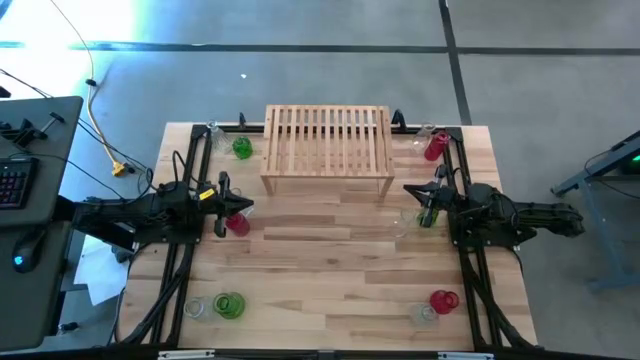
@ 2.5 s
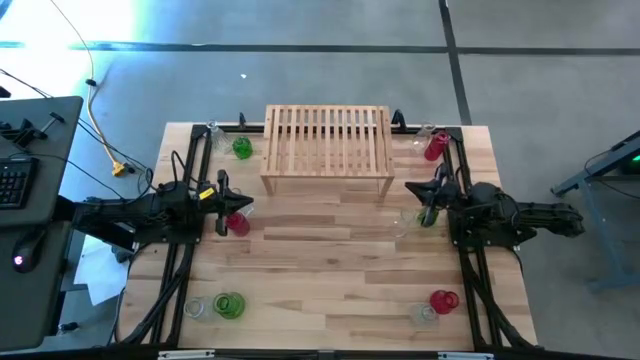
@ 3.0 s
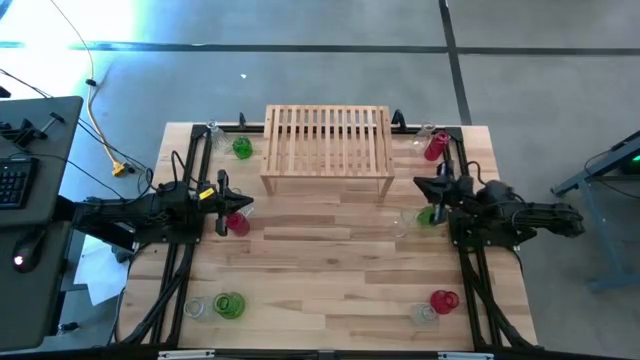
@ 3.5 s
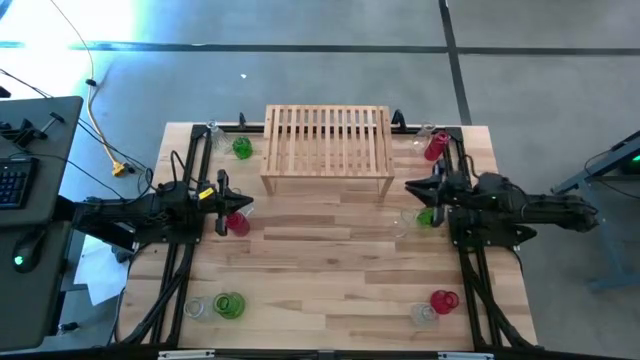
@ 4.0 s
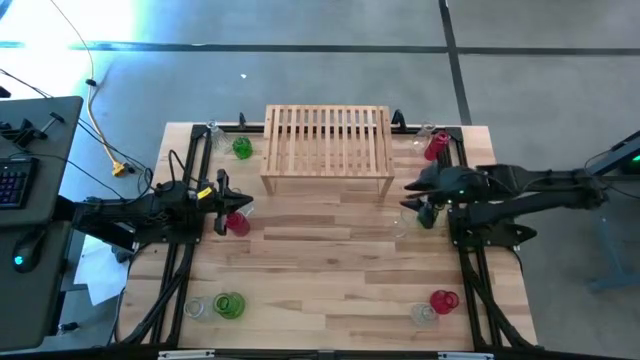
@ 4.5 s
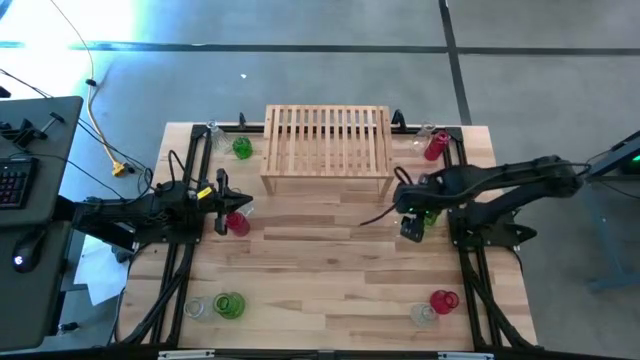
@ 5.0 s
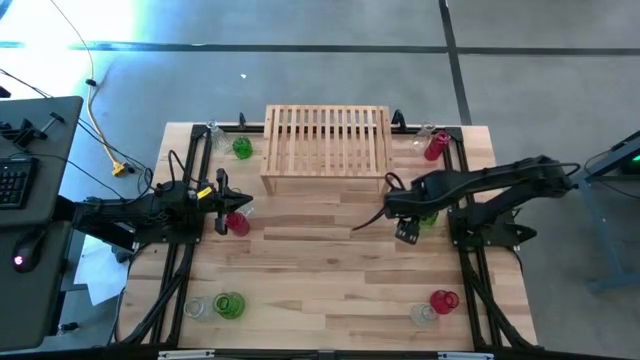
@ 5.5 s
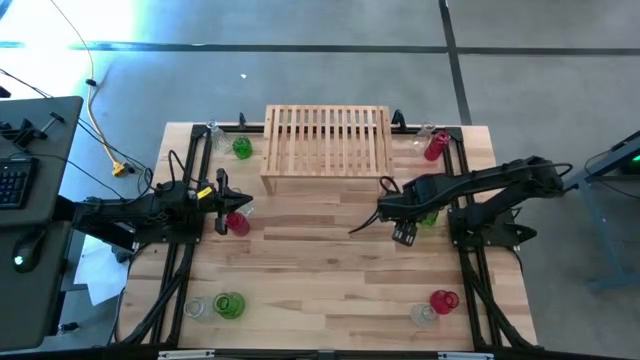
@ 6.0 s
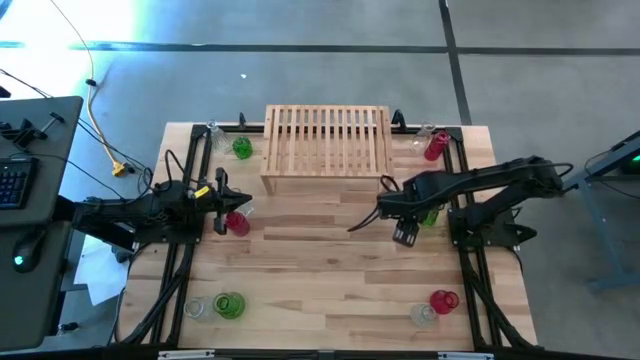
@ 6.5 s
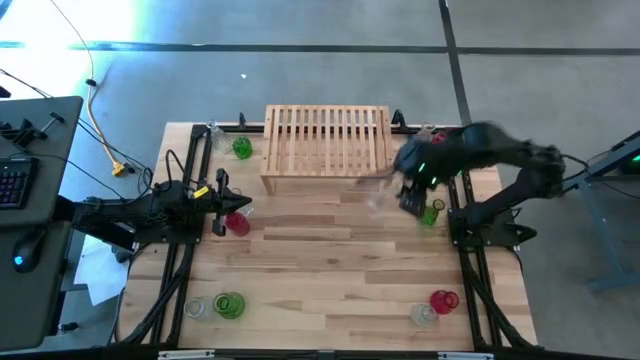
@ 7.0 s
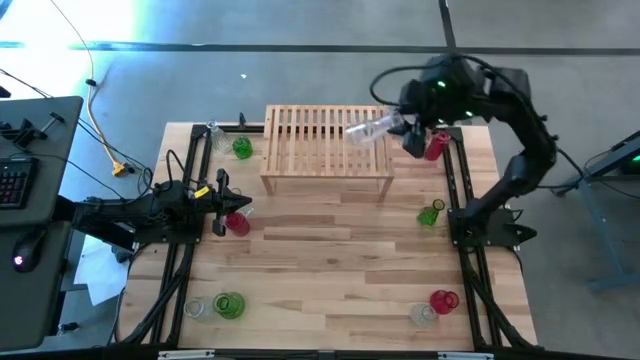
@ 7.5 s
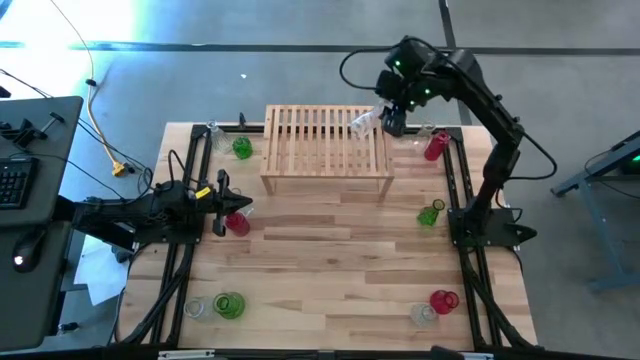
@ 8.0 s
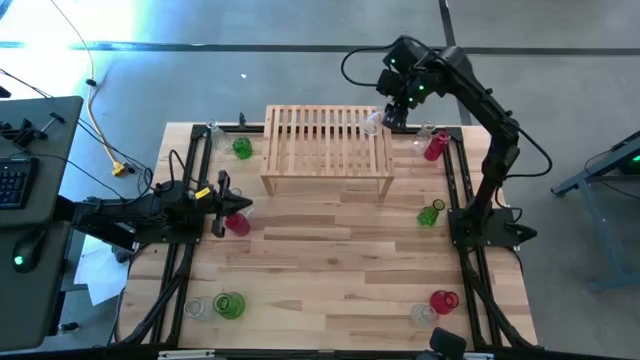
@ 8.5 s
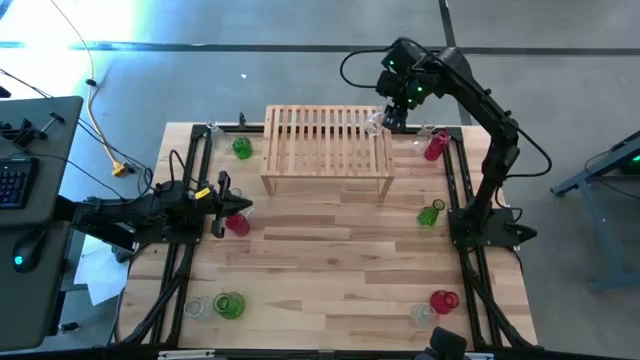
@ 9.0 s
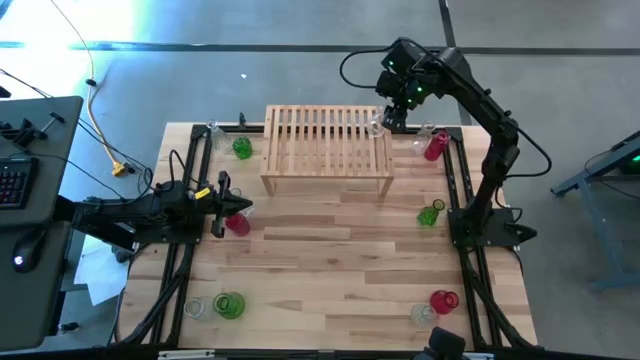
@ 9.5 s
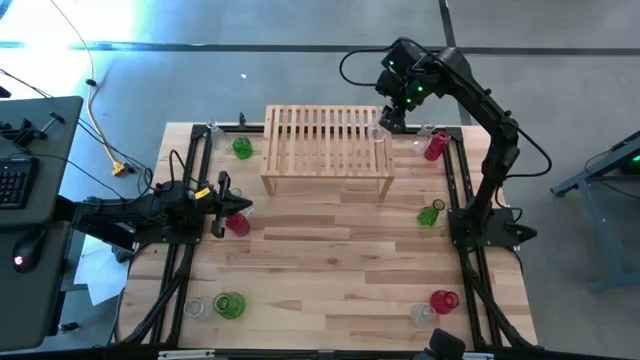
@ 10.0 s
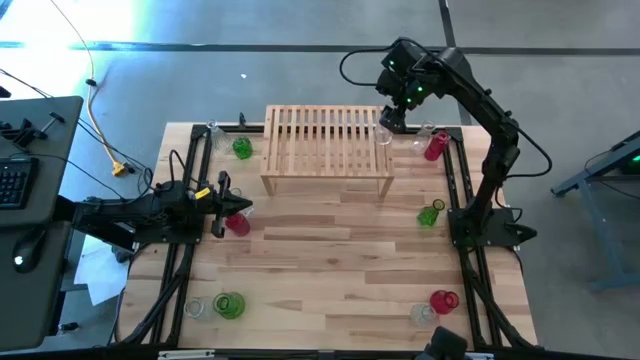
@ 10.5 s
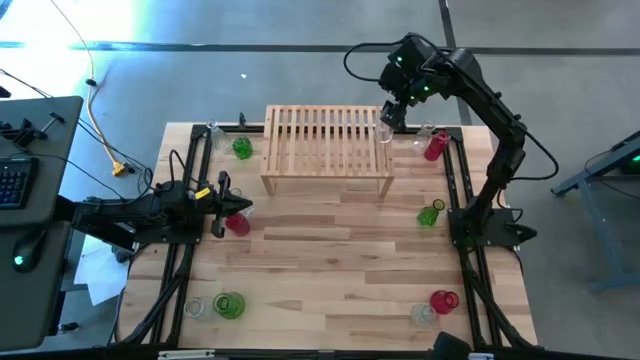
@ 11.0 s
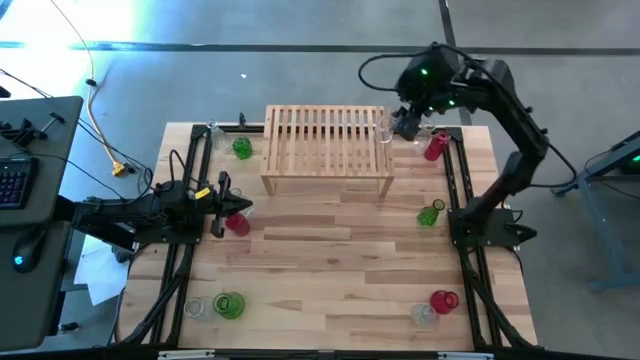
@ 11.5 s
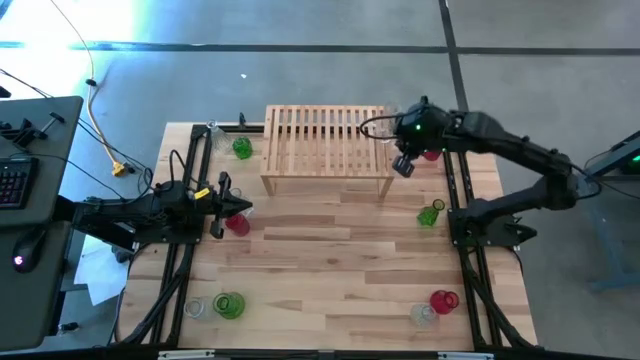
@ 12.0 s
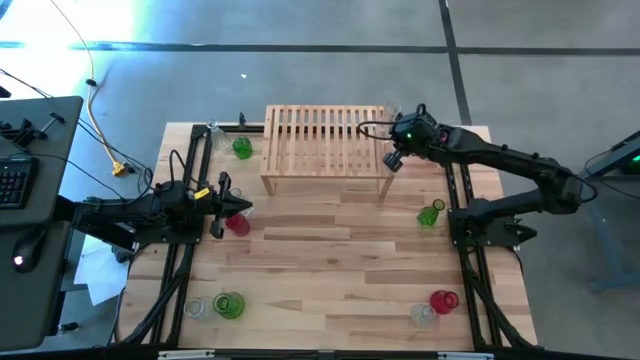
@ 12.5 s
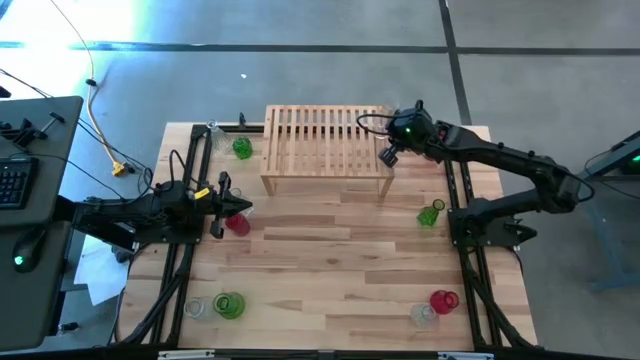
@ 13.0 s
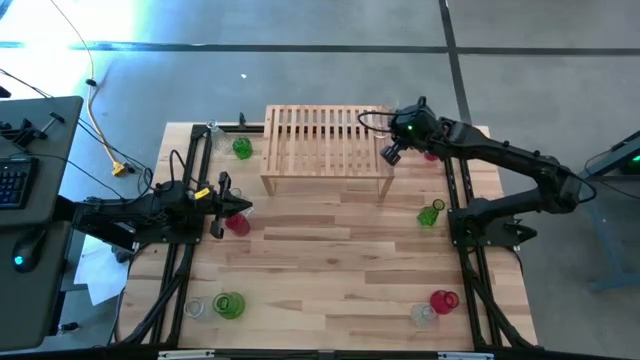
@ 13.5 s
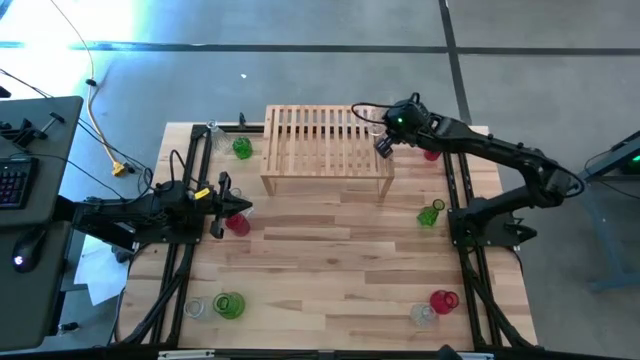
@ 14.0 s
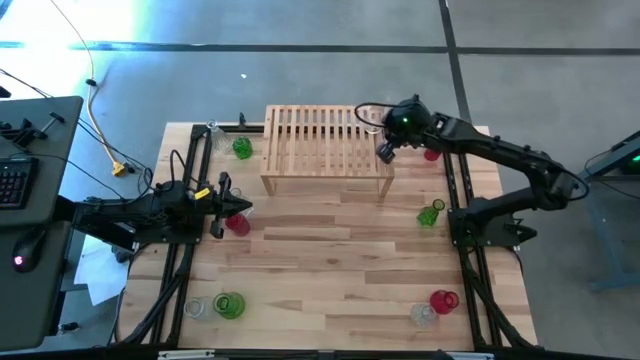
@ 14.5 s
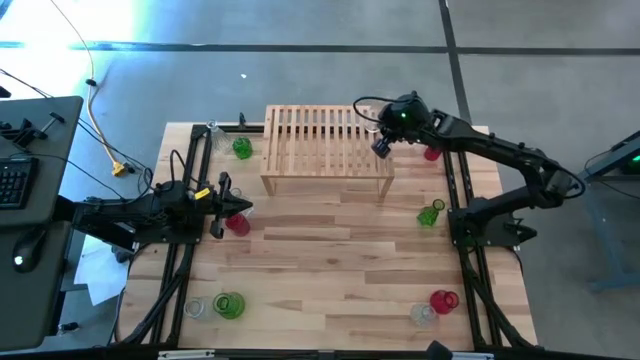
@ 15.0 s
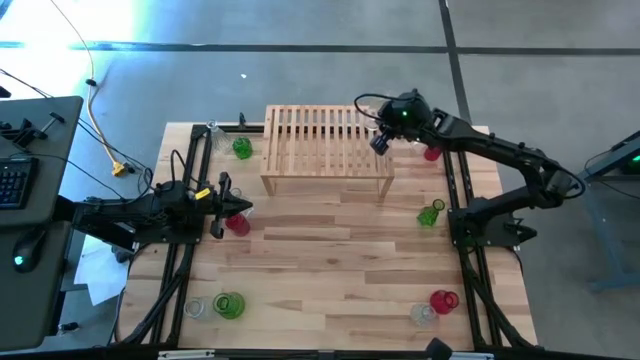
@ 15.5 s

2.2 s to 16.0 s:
Task: sort vases onto shelf
Put the transparent vase on the shelf
